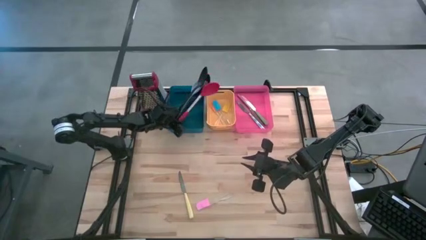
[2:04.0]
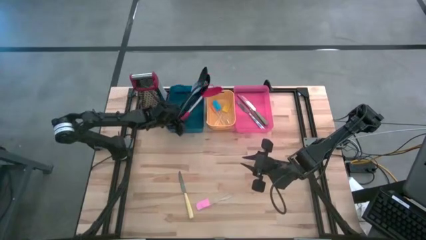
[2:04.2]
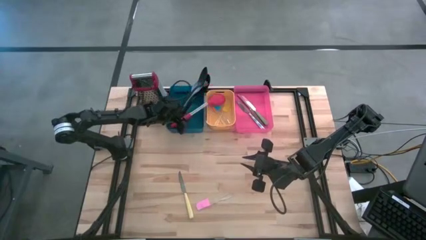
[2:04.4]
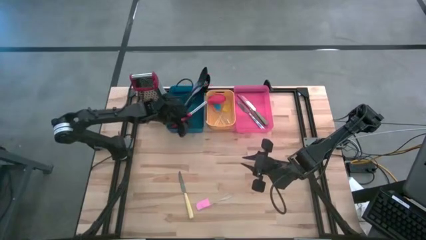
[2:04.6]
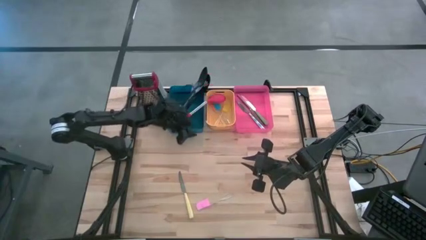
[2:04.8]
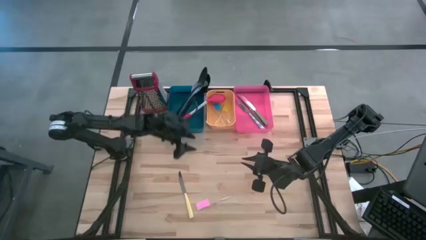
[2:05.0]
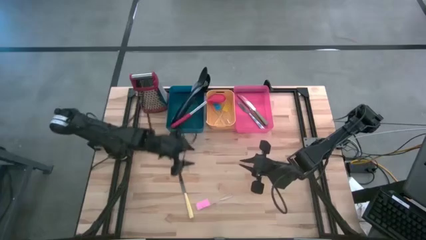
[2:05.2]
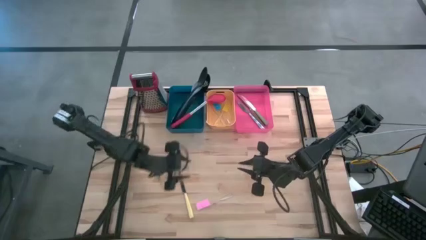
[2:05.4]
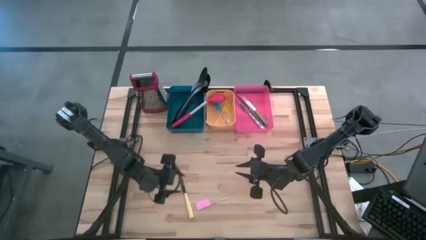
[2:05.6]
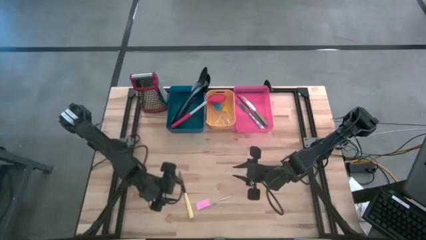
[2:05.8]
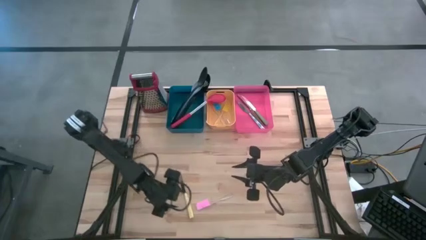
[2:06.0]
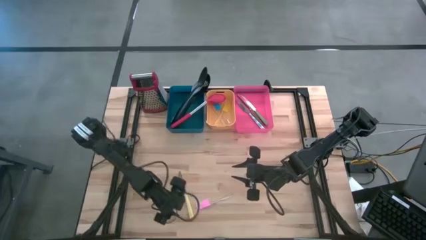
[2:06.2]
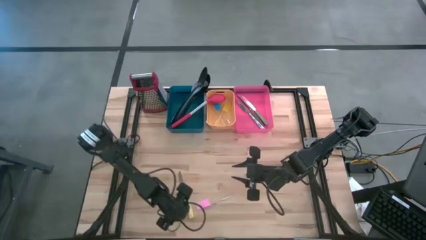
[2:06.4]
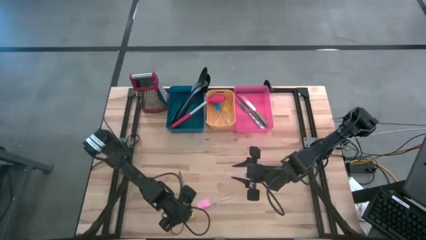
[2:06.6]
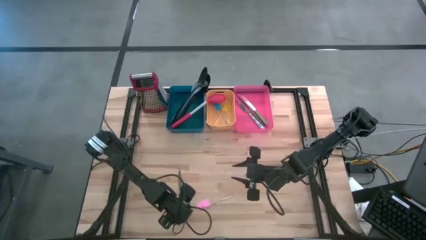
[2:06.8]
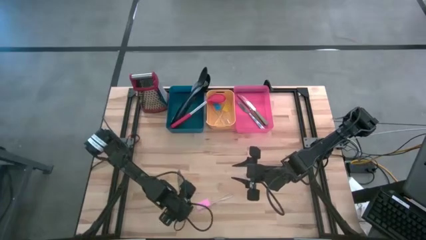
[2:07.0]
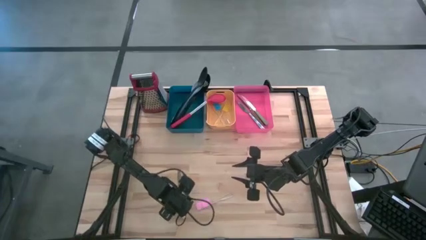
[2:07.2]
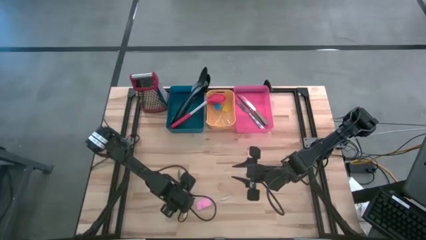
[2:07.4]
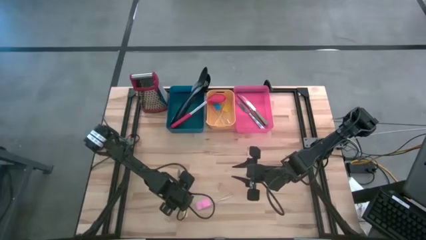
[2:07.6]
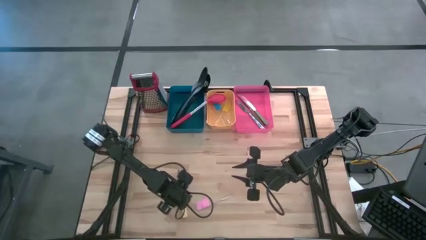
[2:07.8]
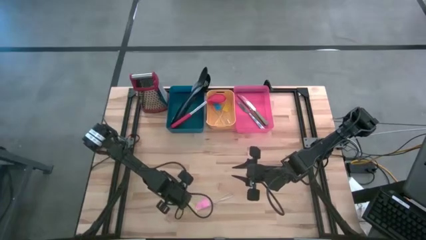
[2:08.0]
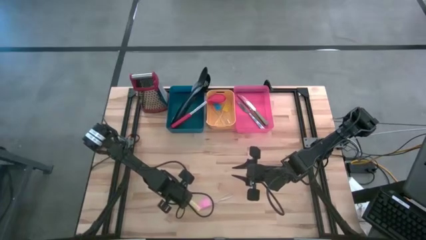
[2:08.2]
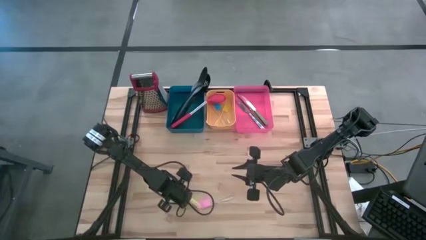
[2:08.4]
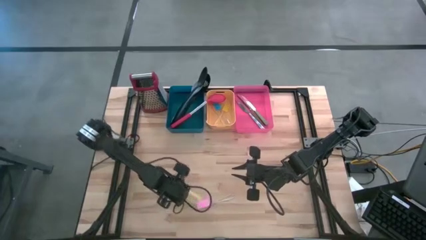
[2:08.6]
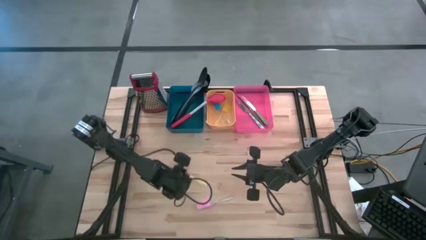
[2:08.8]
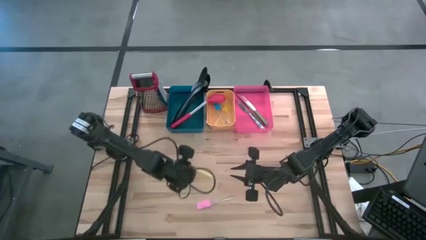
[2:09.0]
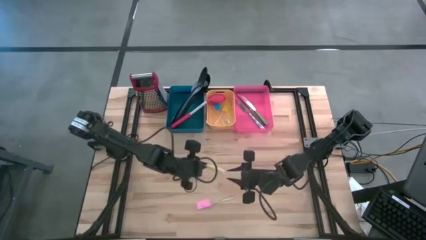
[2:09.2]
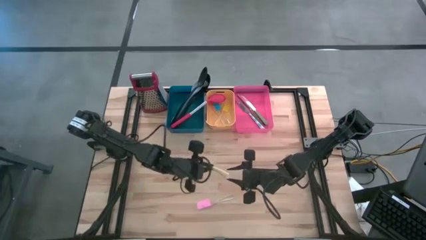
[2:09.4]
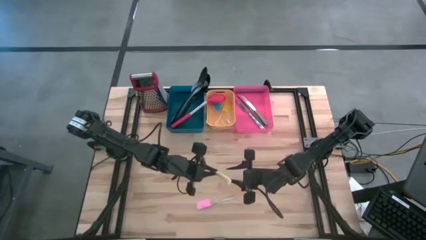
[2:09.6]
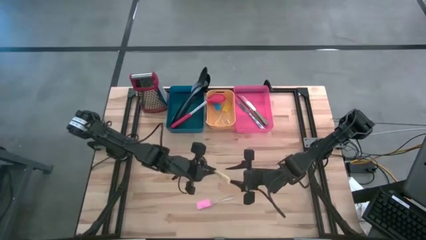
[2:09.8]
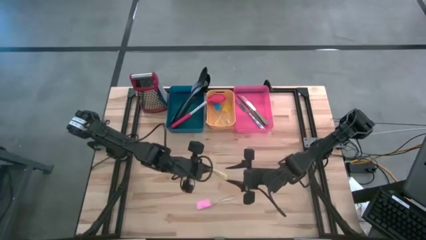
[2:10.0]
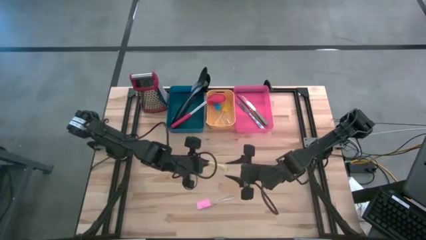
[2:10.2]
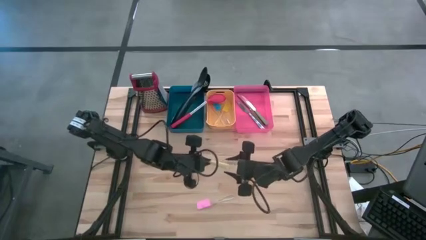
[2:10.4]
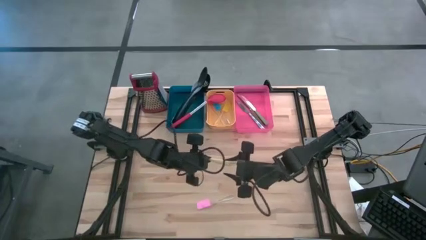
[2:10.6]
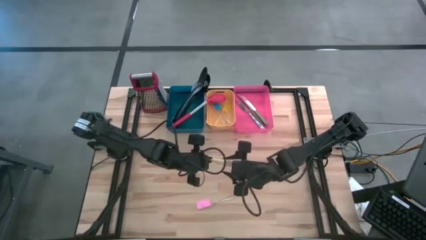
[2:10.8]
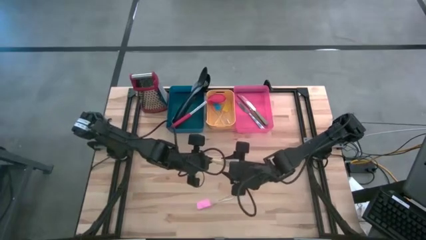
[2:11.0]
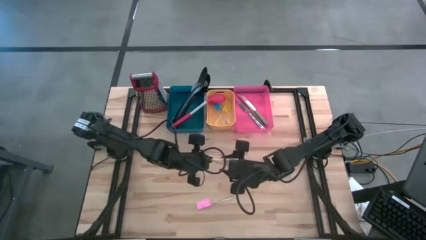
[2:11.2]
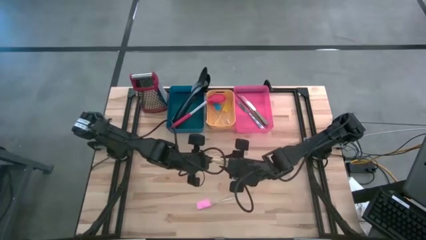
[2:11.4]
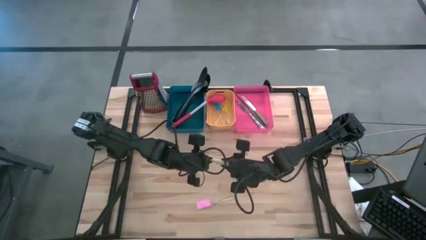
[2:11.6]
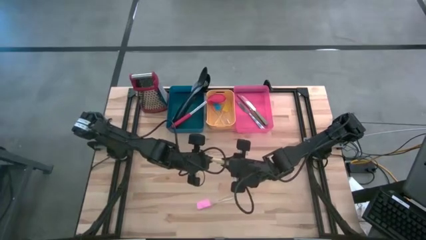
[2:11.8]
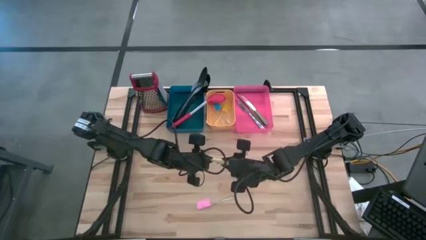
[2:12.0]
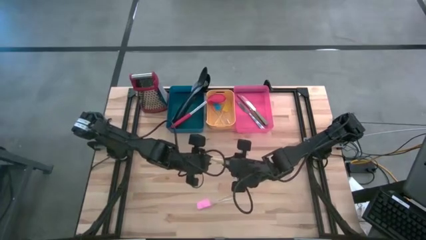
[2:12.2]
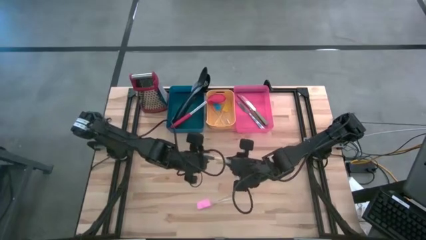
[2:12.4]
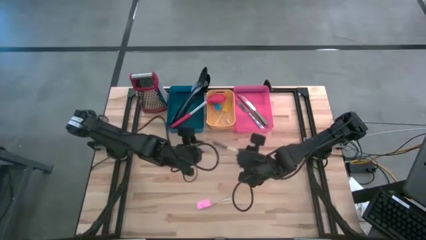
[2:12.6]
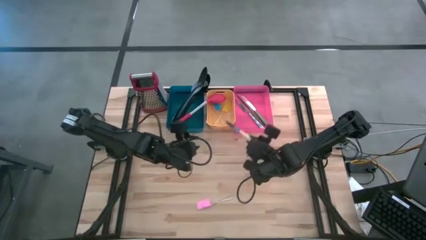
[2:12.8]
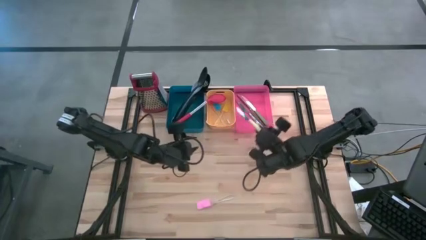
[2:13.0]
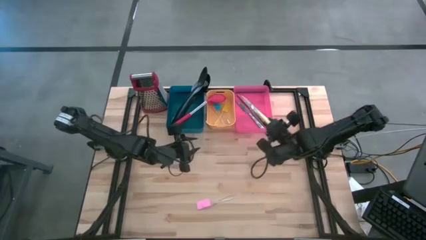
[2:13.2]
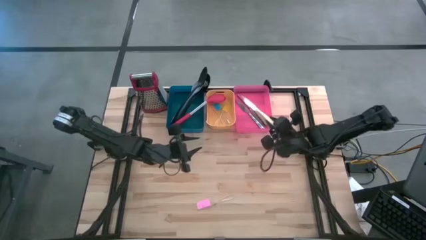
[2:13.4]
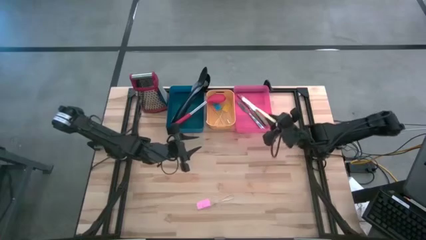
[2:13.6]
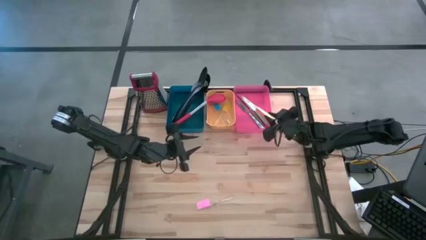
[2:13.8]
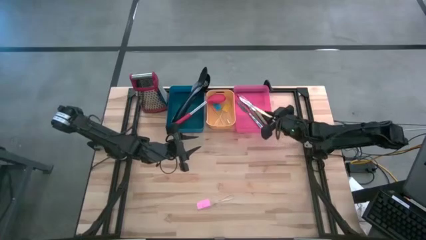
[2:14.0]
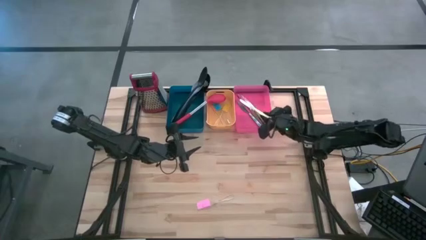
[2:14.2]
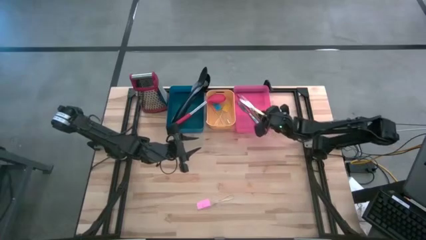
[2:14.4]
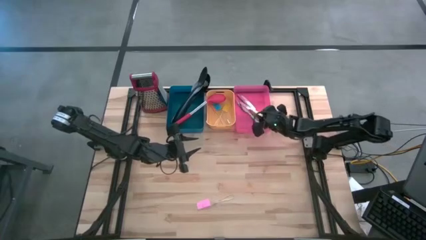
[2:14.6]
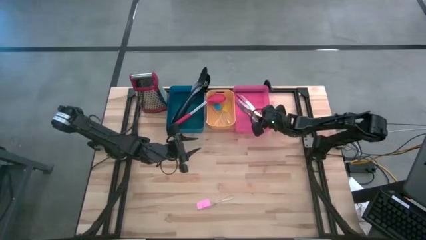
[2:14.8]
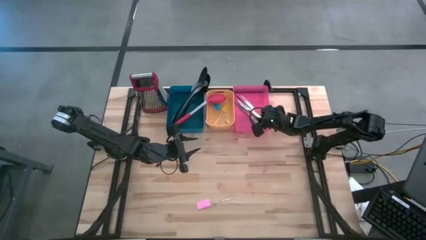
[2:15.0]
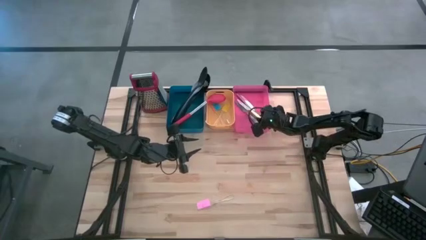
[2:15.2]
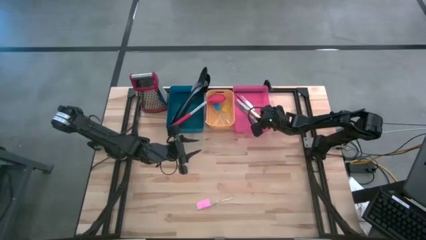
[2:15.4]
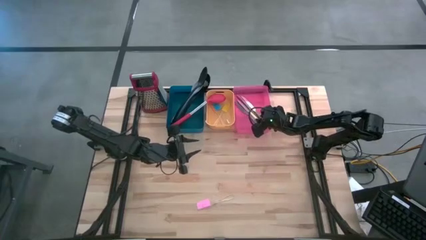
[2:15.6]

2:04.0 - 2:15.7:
Task: Pick & Place Kitchen Items
Put the yellow knife into the red bin

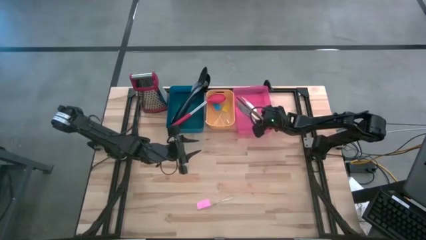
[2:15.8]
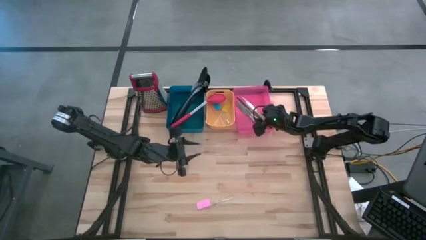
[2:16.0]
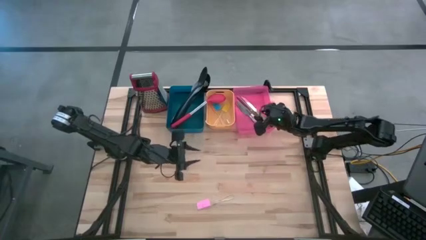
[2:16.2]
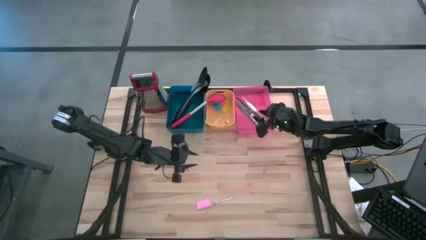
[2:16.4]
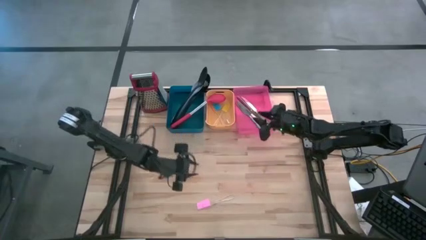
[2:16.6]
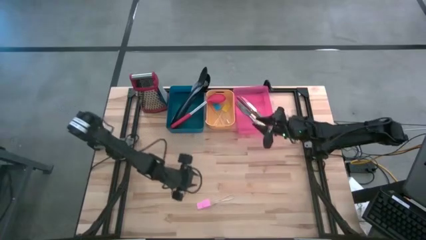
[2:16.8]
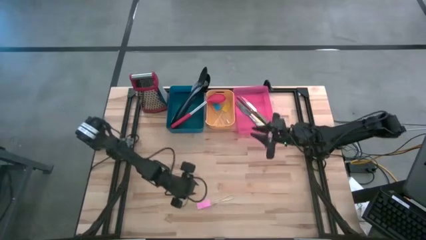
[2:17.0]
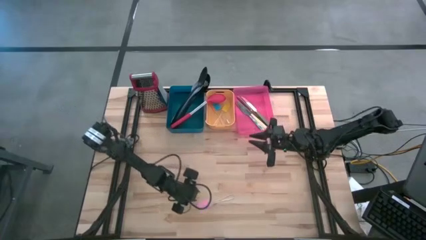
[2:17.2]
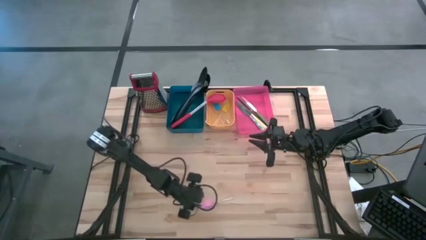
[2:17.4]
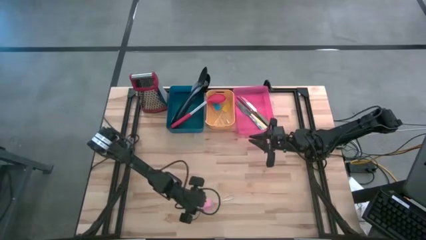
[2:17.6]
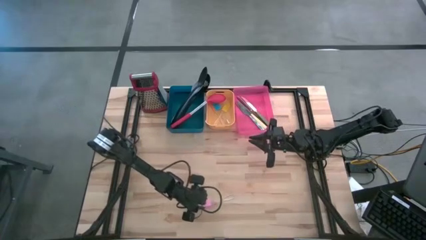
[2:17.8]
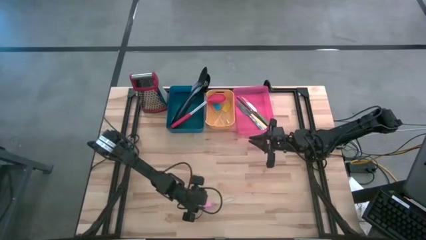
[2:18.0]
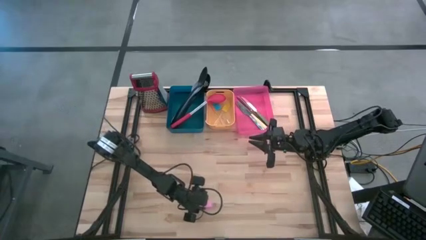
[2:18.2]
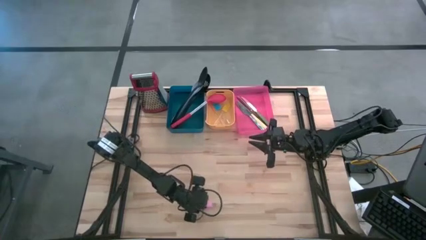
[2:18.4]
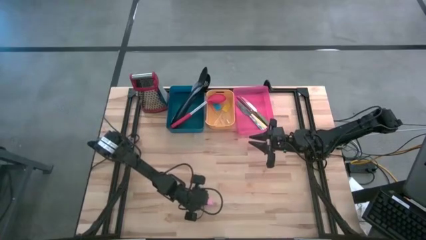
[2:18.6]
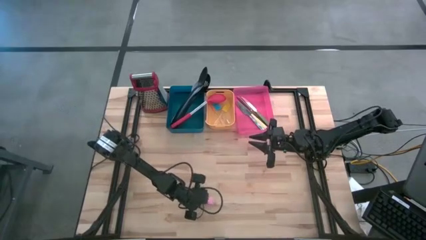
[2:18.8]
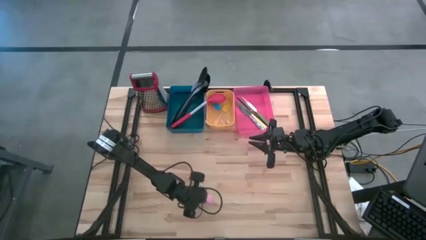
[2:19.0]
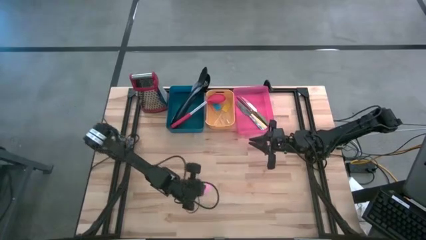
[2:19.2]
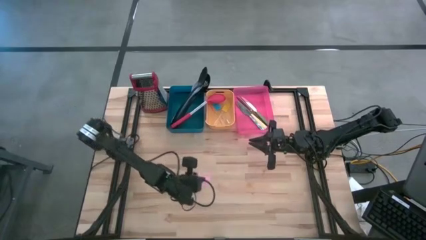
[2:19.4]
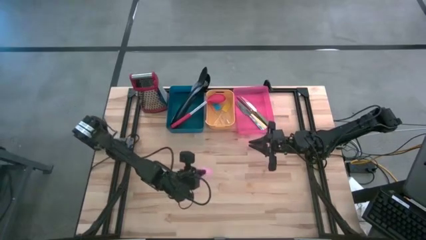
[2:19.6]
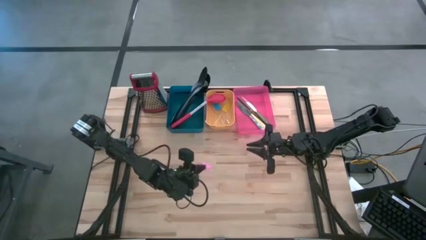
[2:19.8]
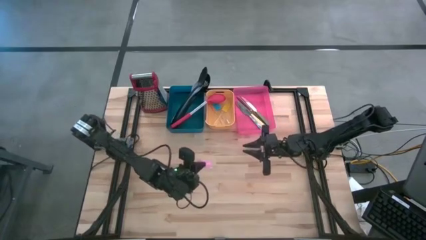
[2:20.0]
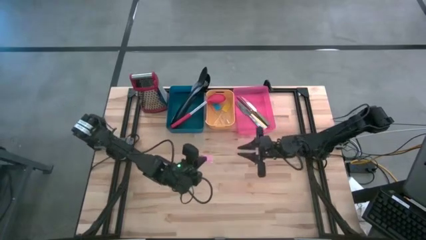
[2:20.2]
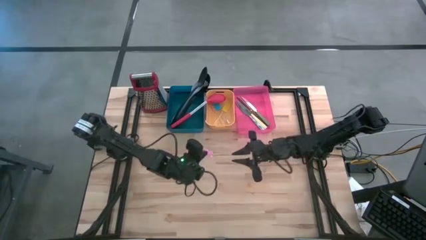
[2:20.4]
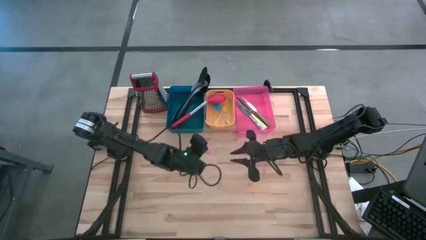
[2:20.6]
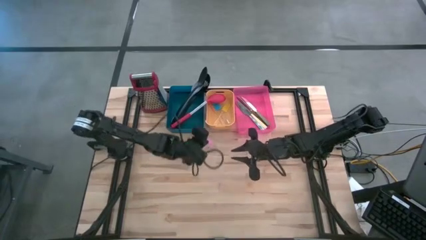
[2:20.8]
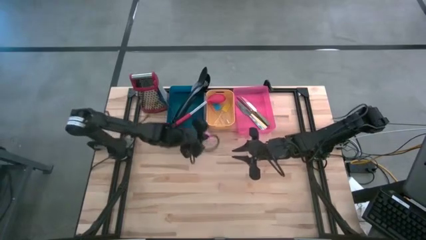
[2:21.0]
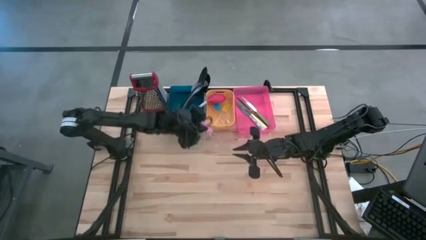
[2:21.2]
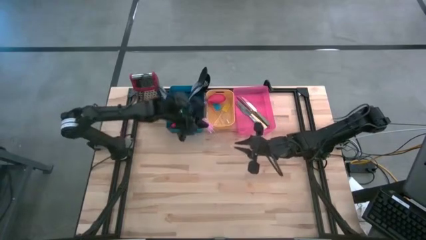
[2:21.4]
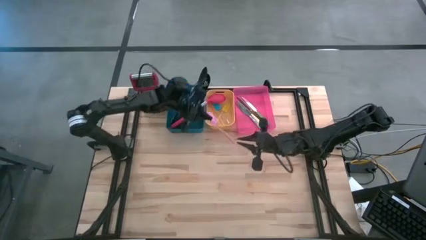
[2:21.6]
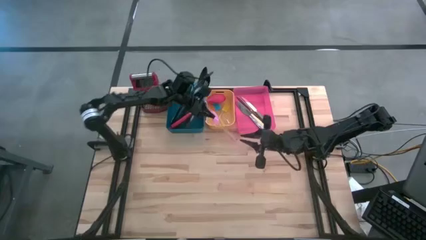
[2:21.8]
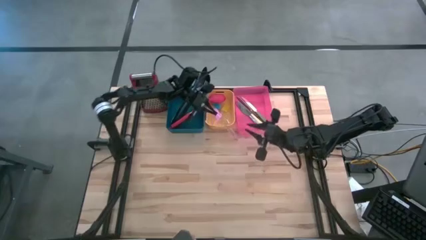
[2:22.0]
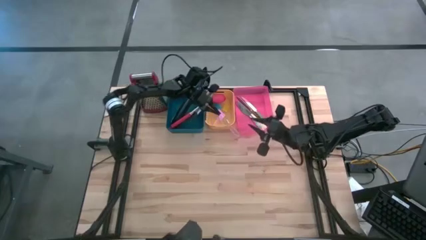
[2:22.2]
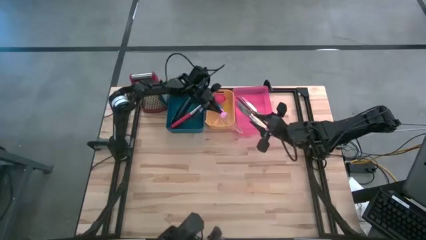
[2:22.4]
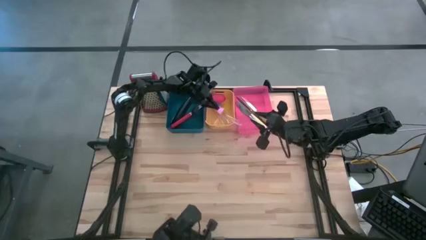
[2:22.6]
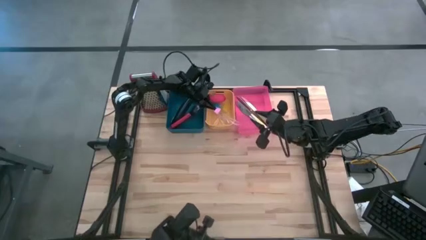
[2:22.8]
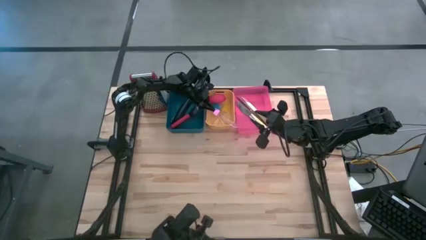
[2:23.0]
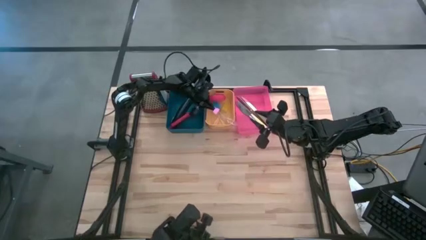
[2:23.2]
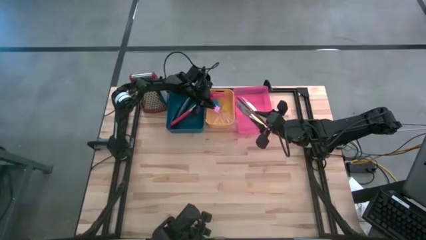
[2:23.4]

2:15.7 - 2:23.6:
Put the pink spatula into the yellow bin
